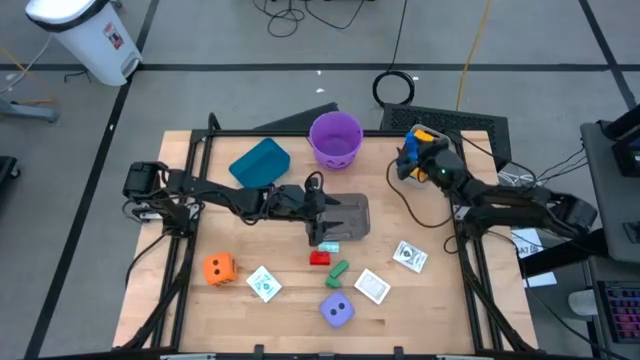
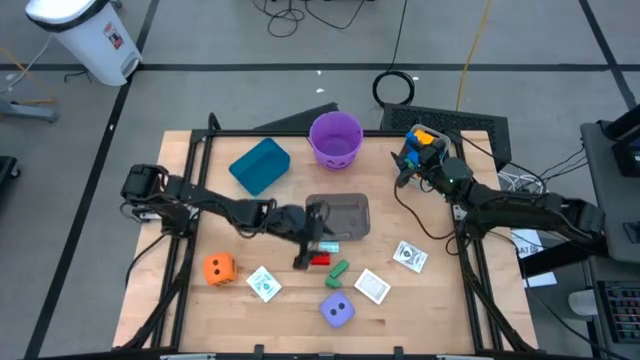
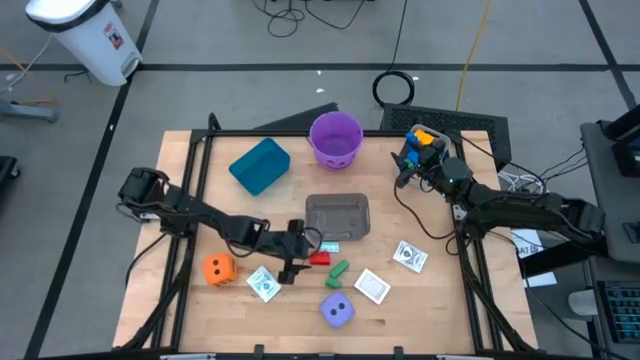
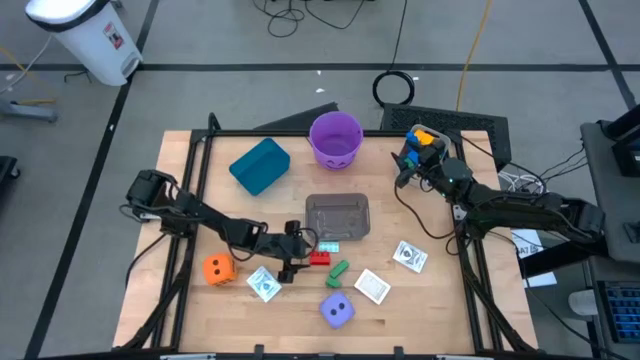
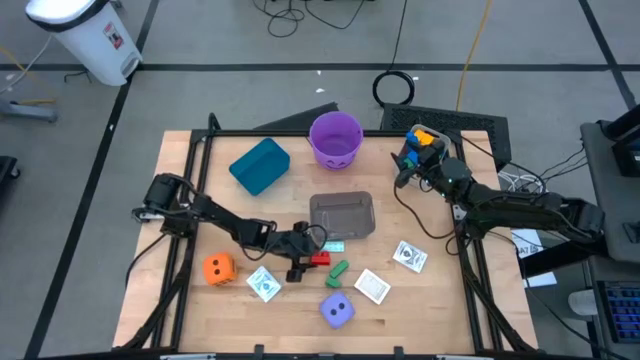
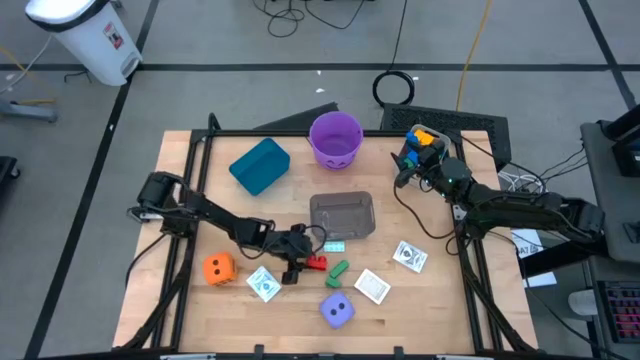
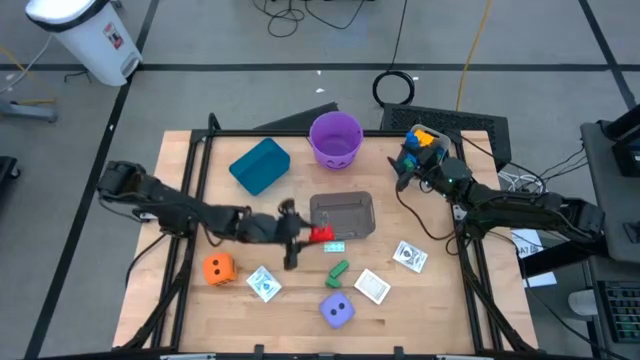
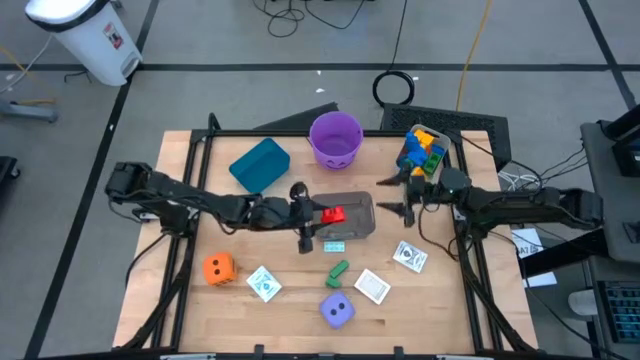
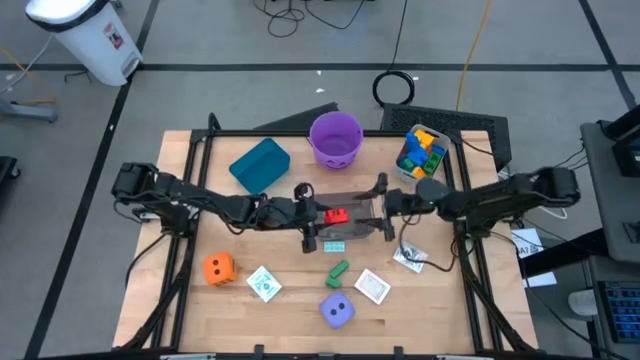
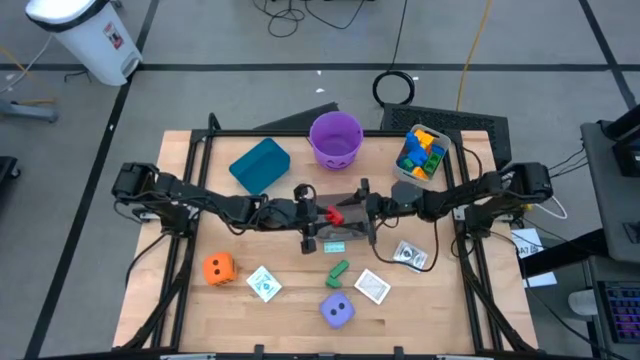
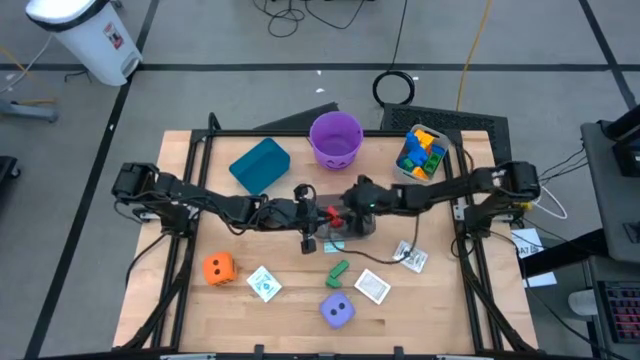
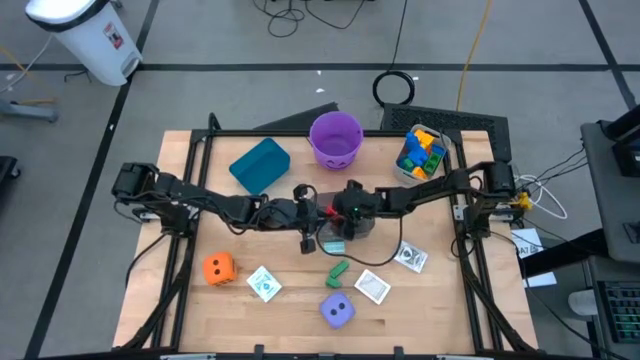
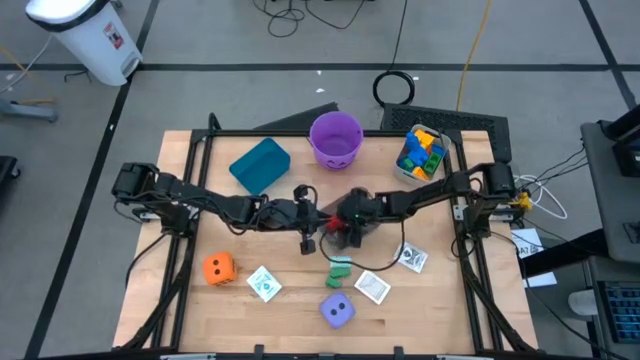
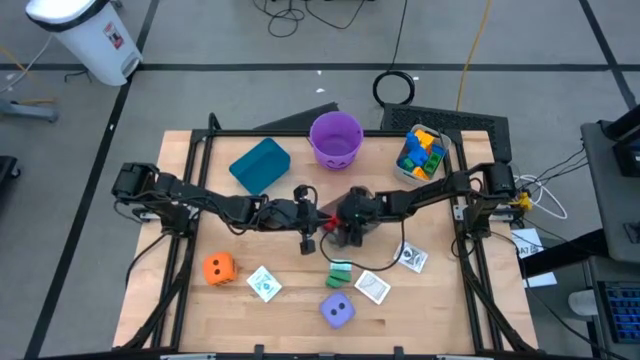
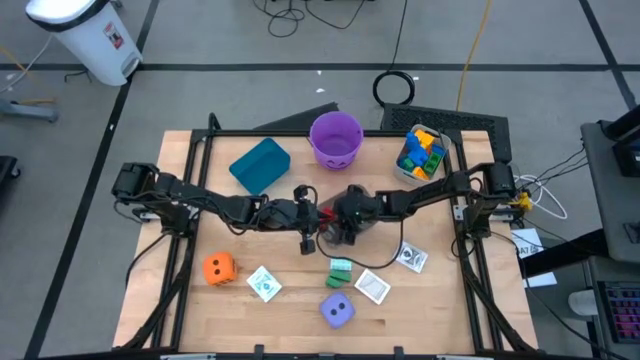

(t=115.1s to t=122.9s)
Task: Pick & Place Toys
Put the red game piece into the white bin

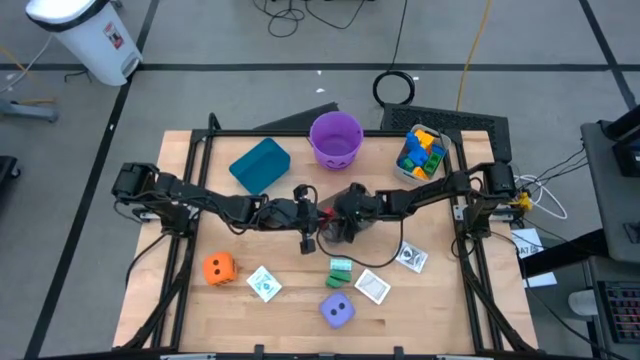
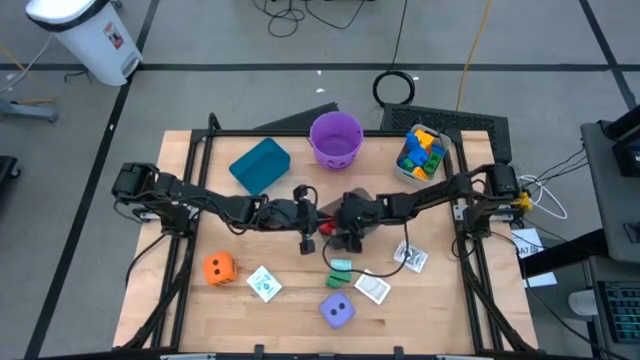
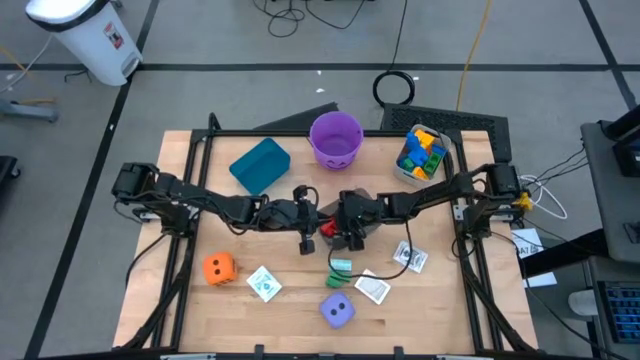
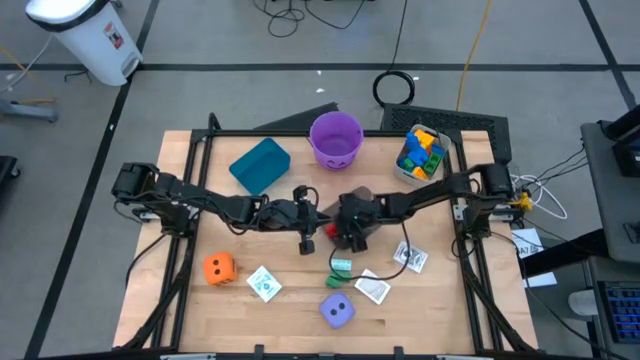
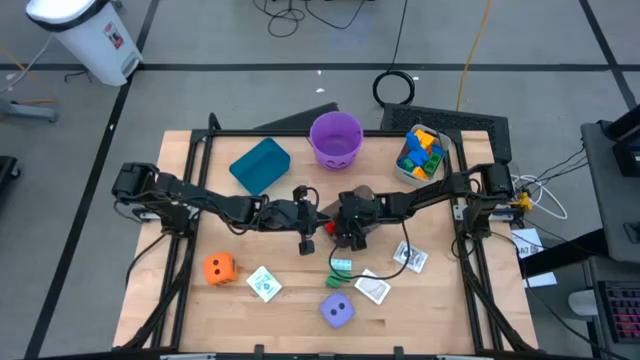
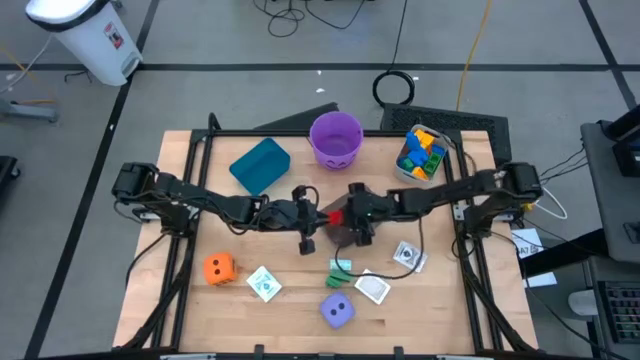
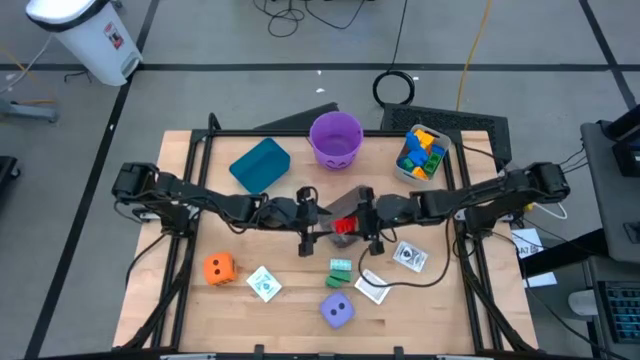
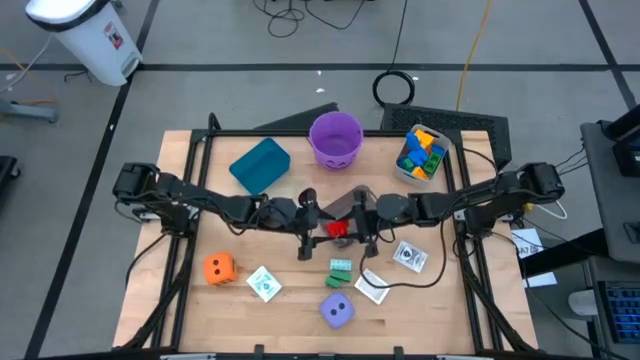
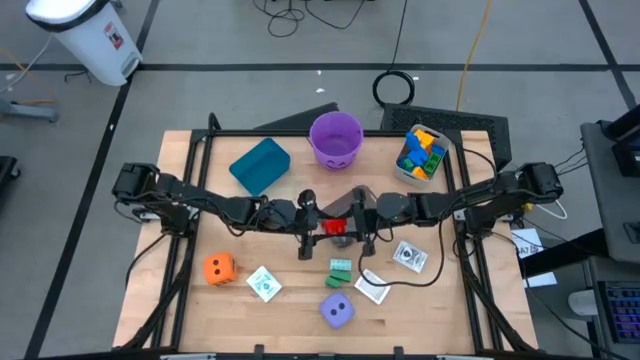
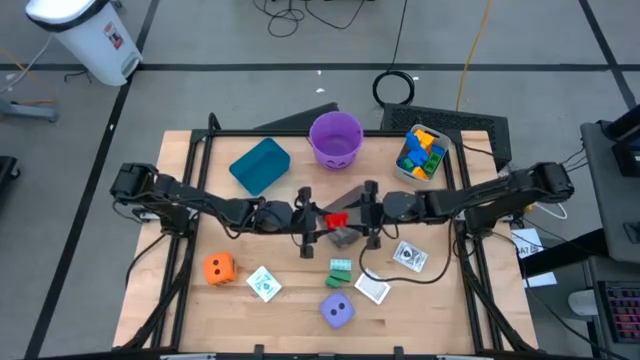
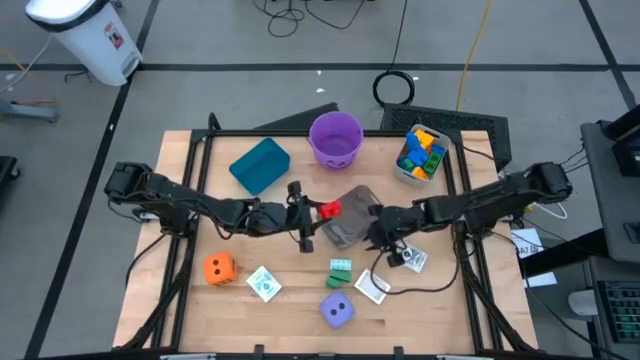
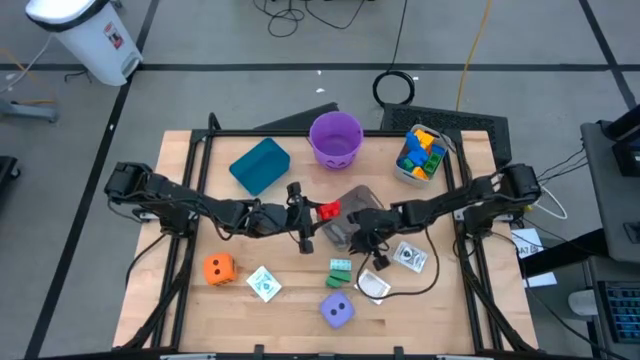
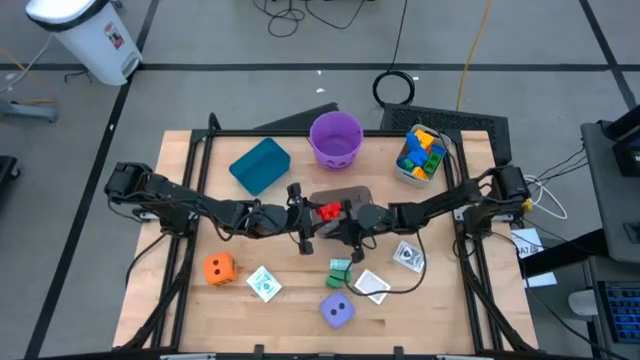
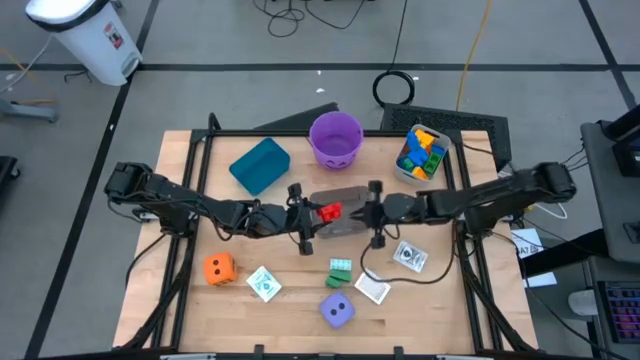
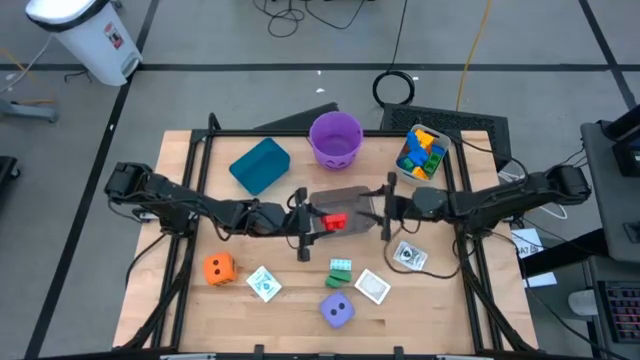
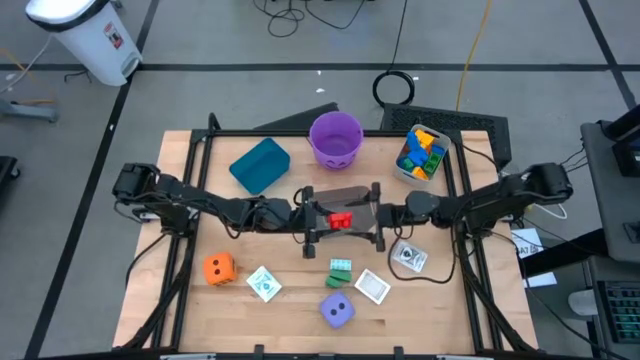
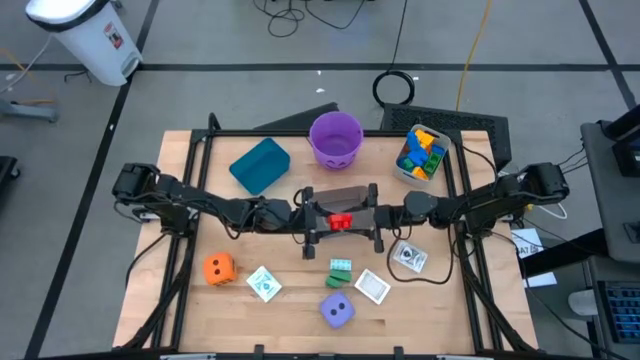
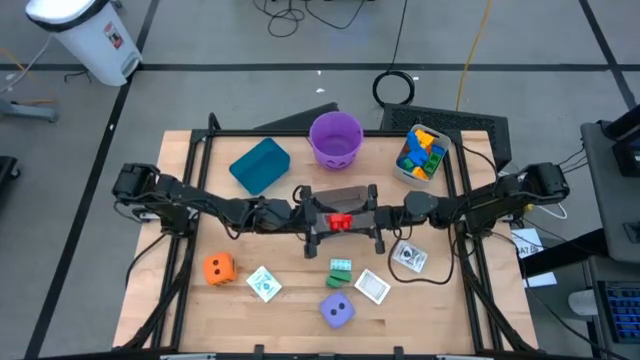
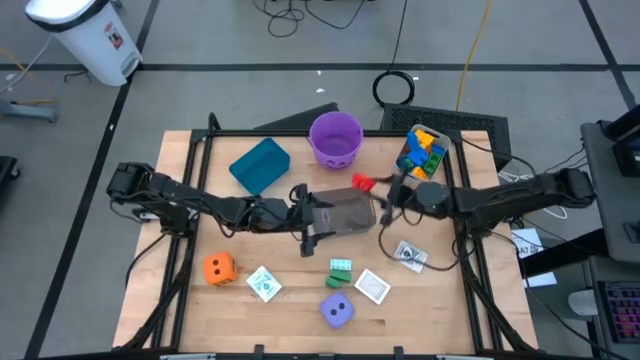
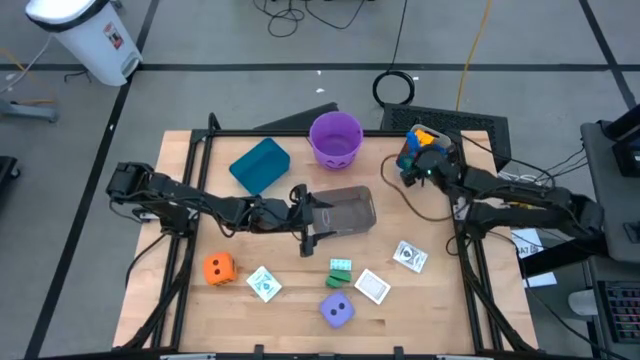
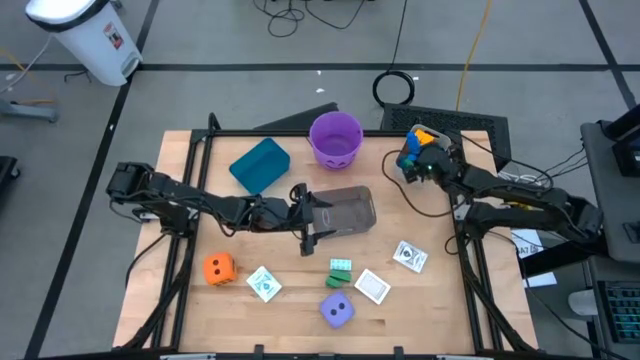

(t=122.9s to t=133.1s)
Put the red game piece into the white bin

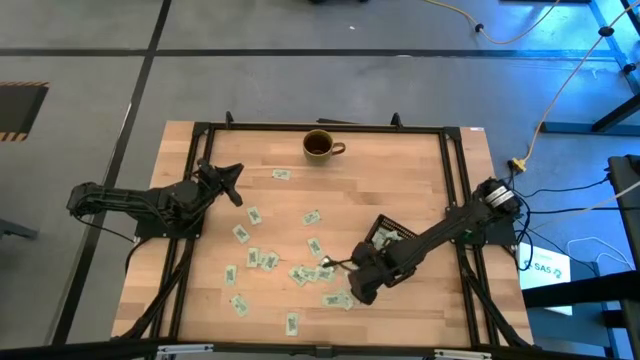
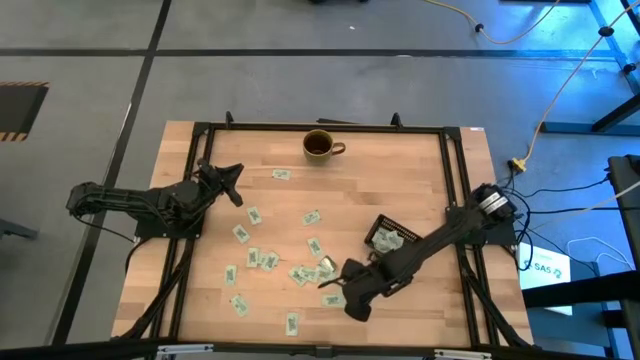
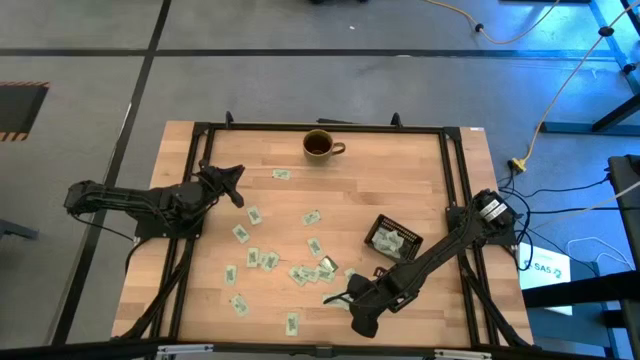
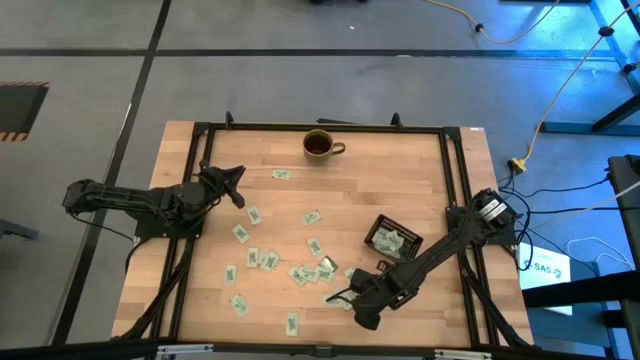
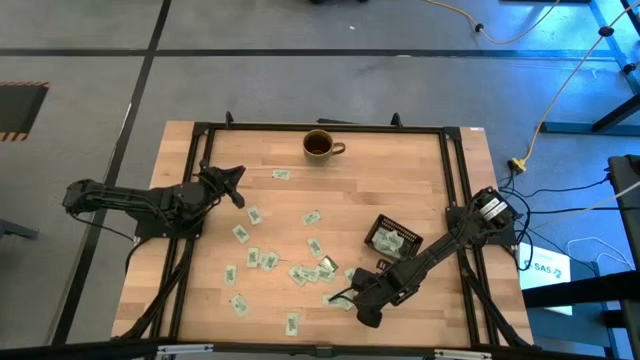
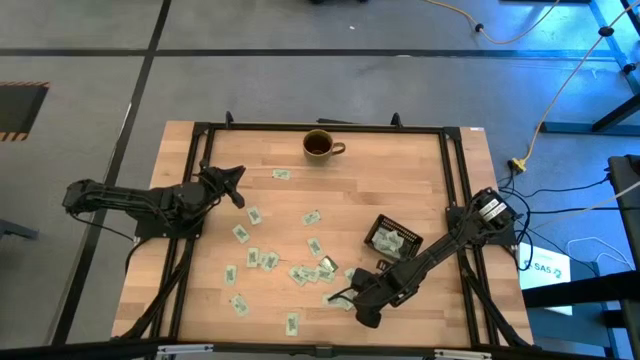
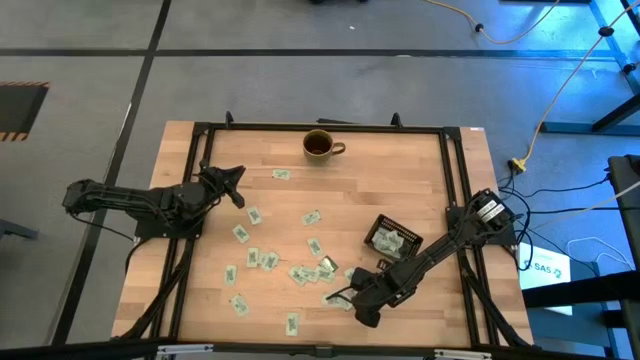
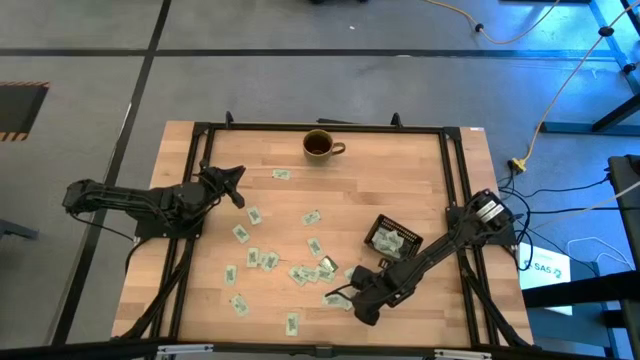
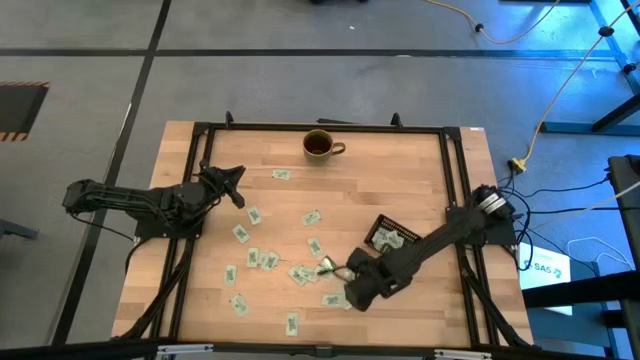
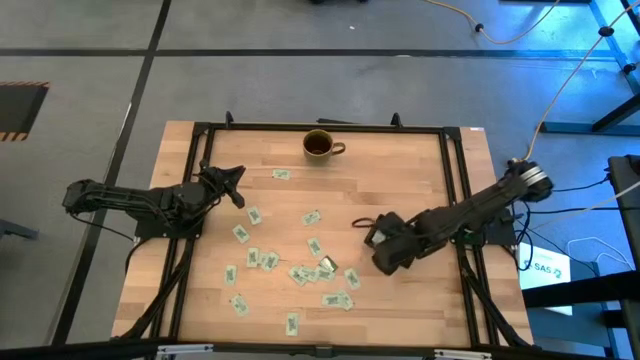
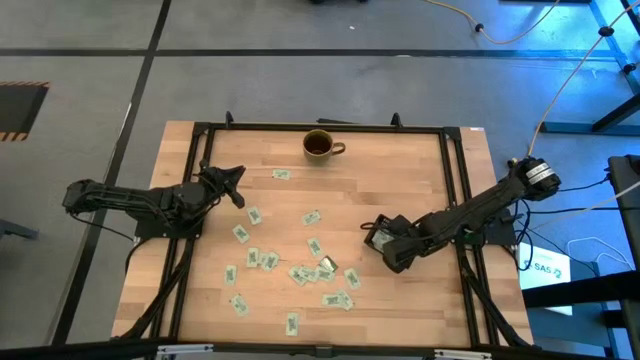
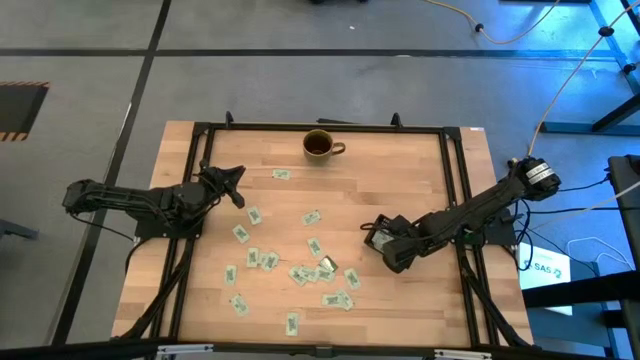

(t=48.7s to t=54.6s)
Task: Pick and place Stevia / Truvia into bins
Put the stevia packet into the black bin
